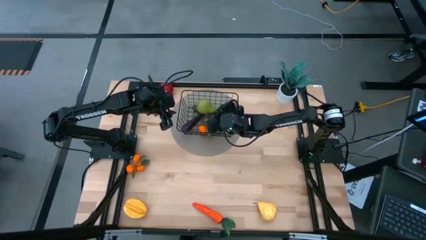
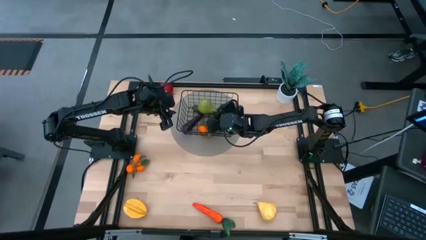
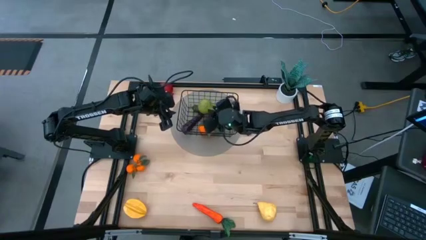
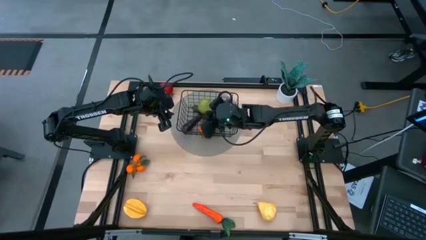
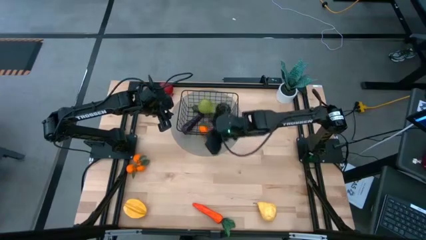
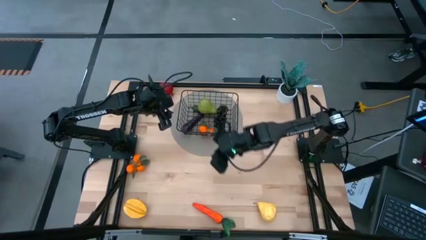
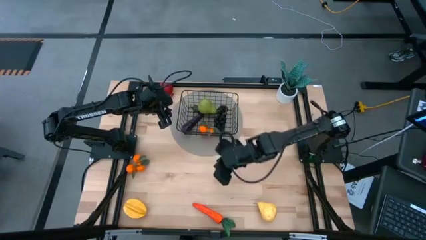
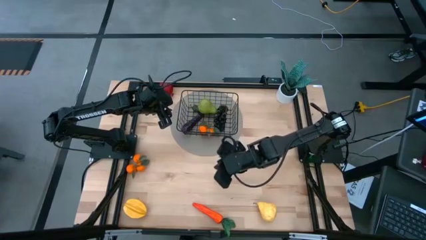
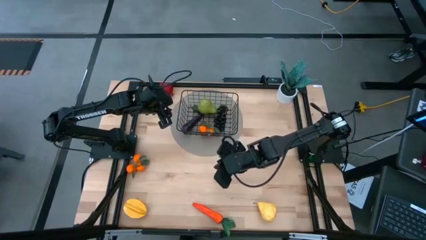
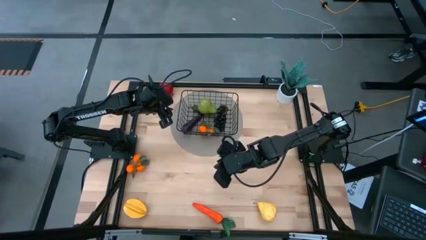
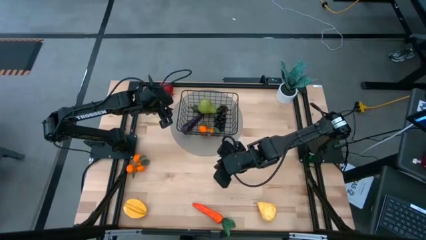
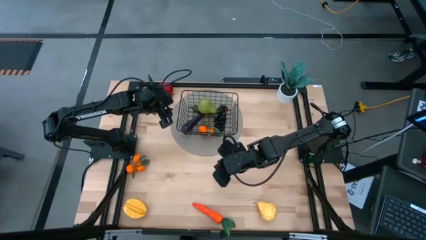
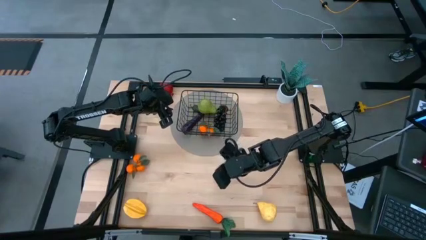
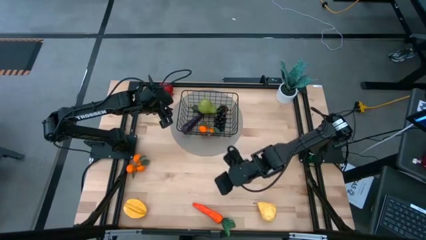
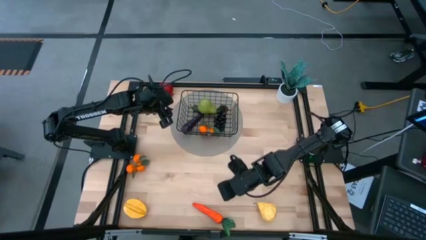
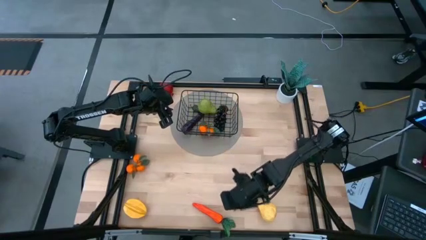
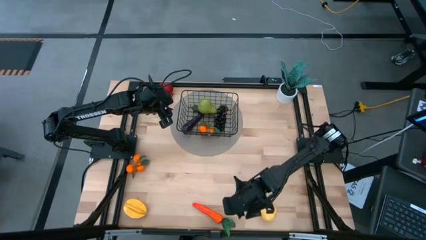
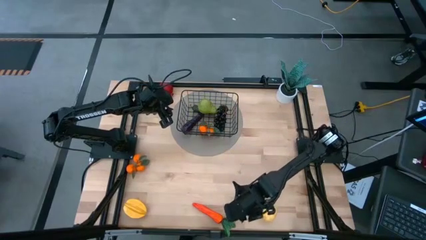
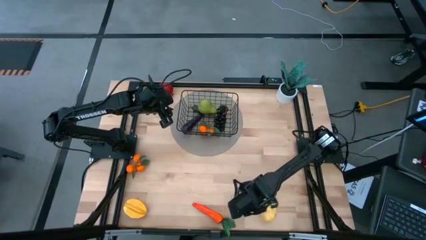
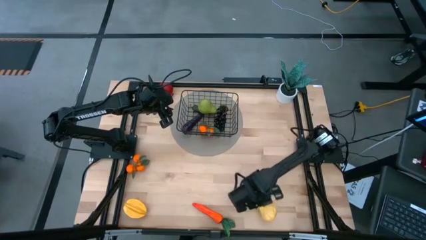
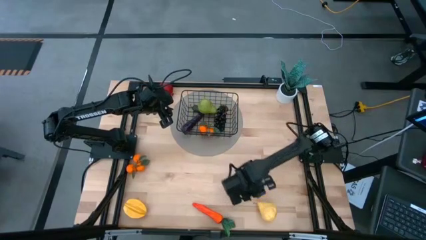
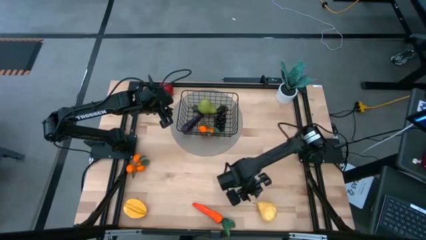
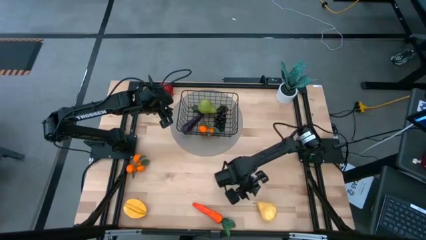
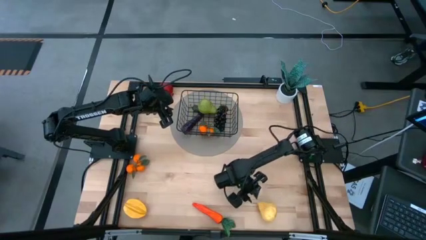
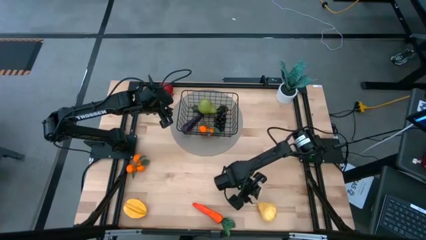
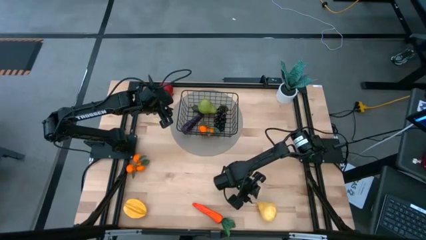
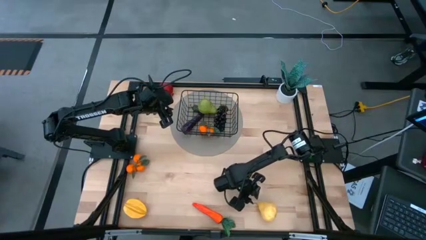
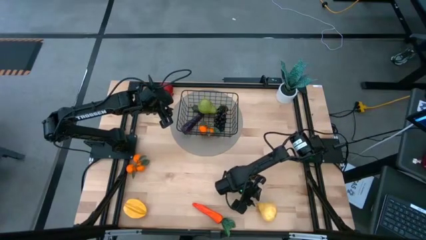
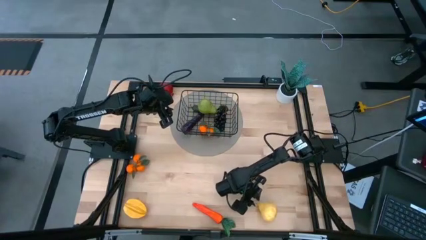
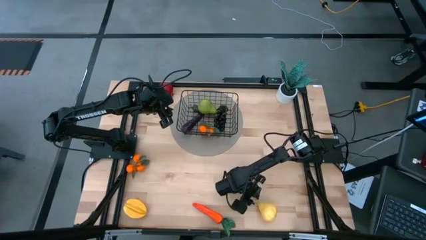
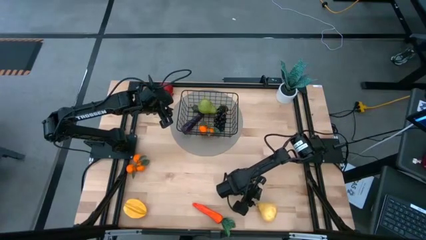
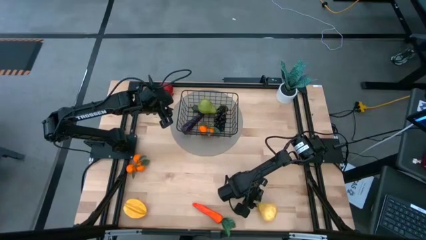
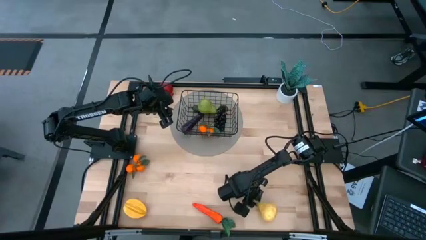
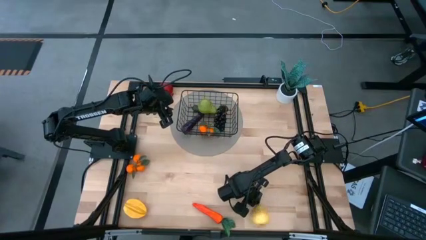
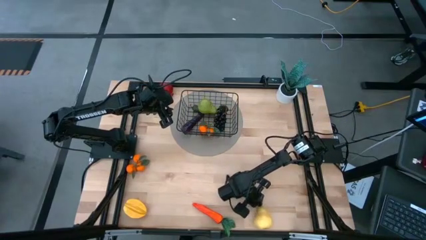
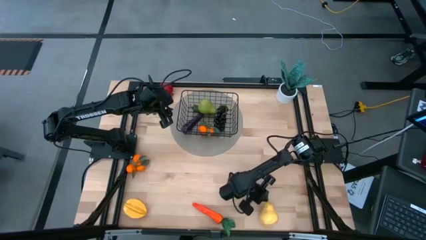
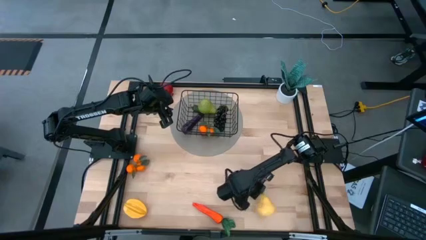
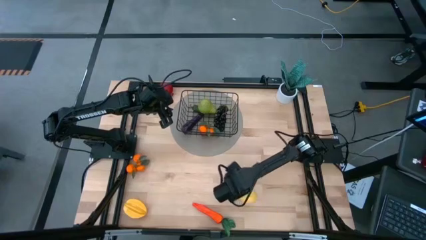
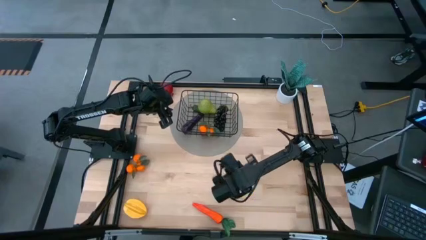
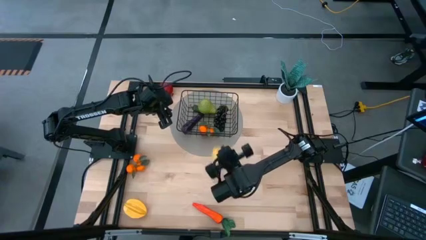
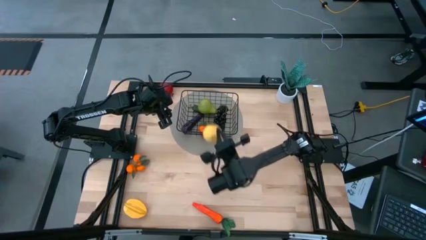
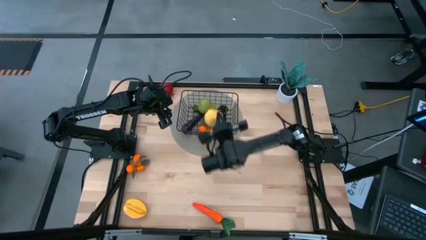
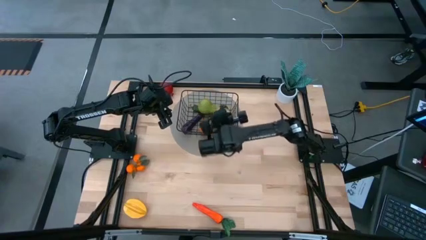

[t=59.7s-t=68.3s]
Task: Build produce basket
Put the yellow pear into the black wire basket

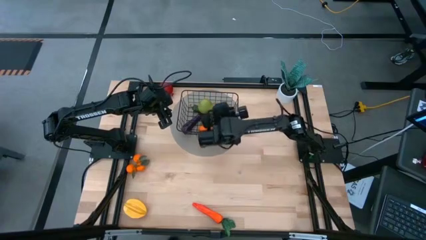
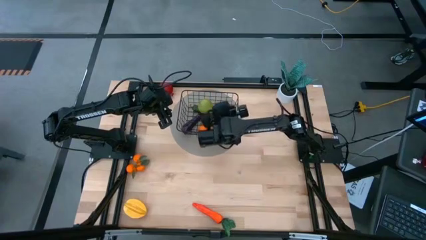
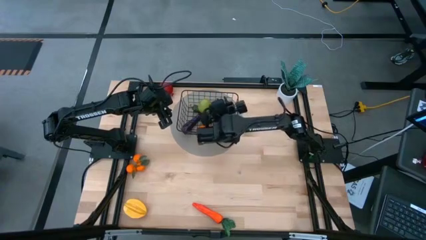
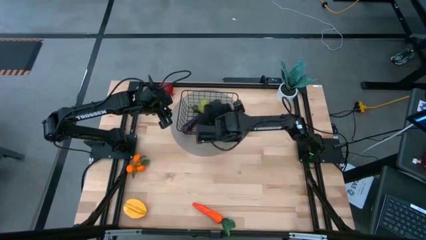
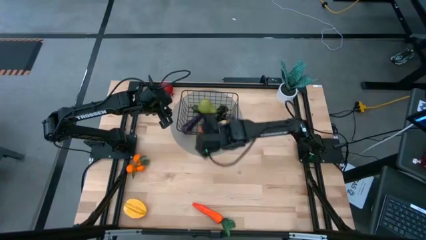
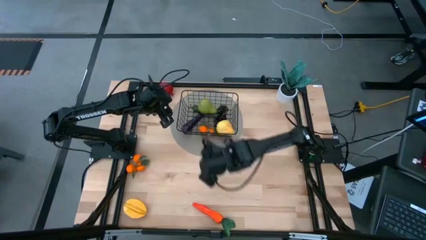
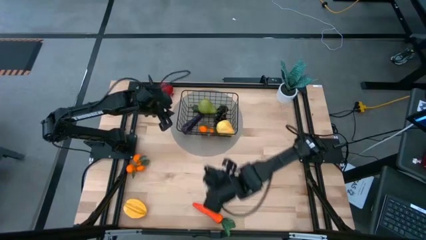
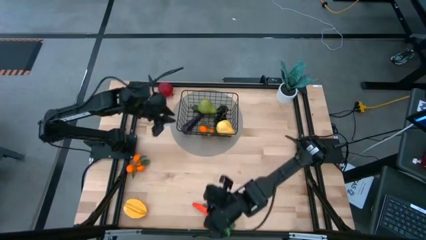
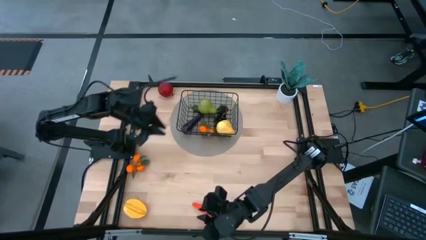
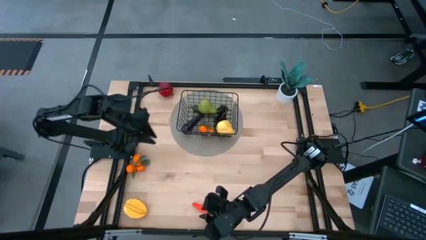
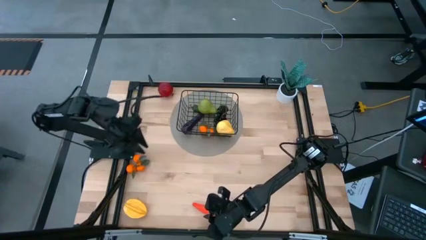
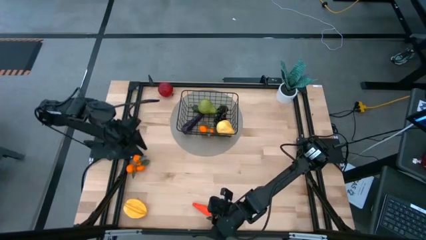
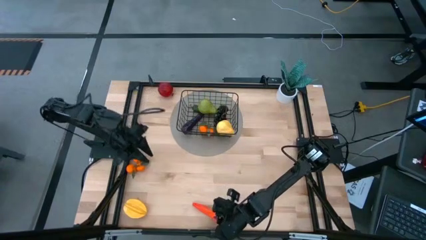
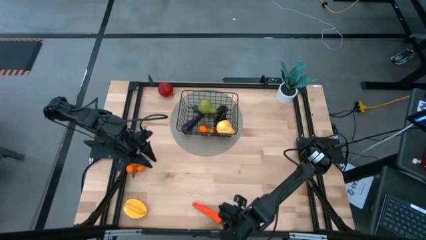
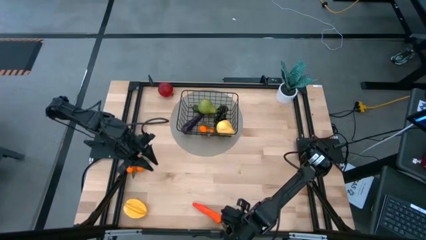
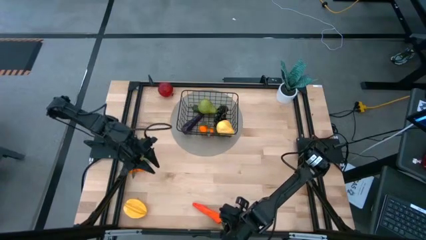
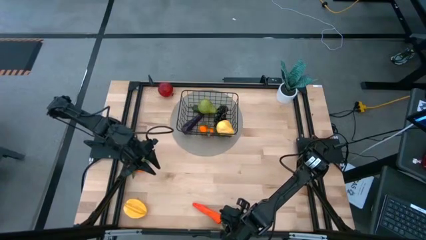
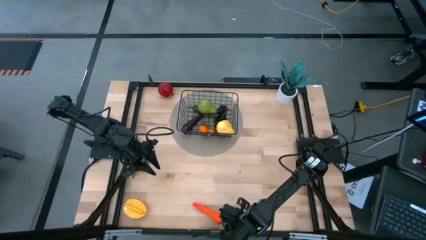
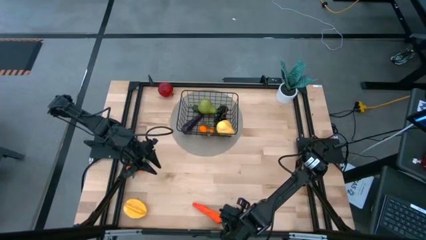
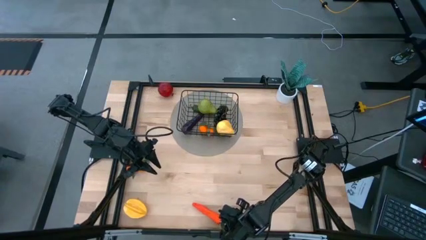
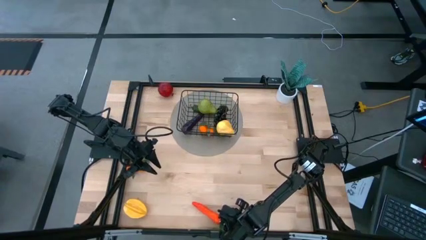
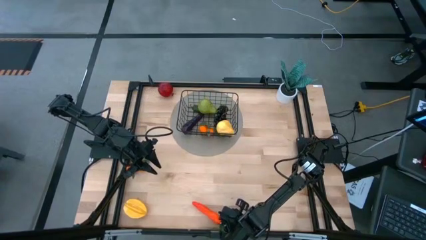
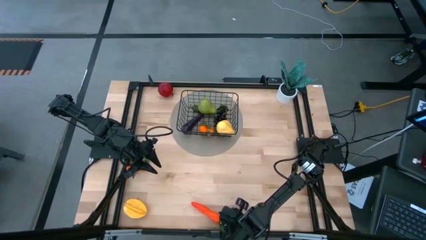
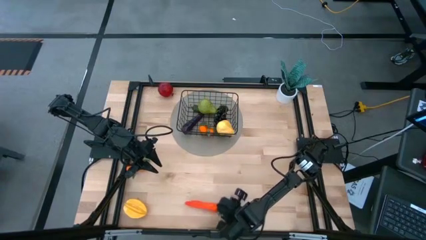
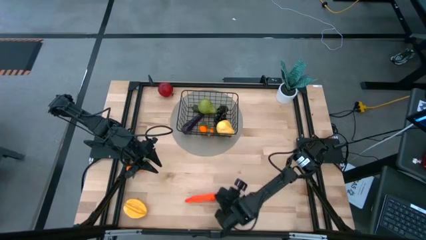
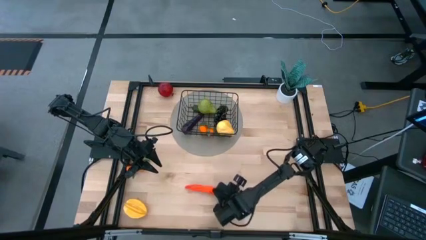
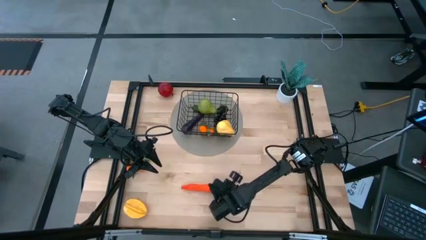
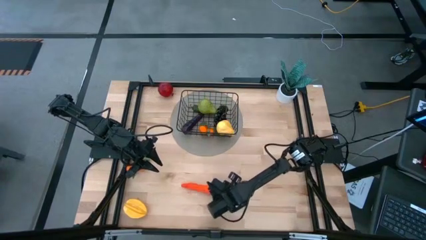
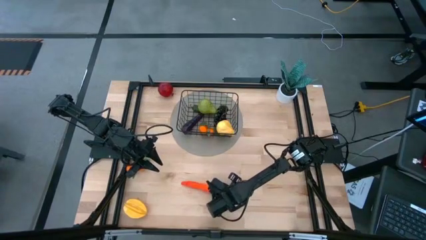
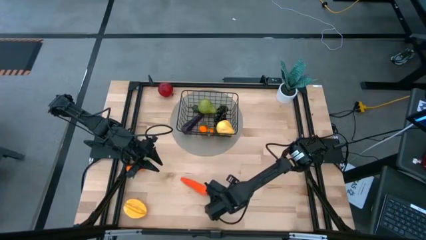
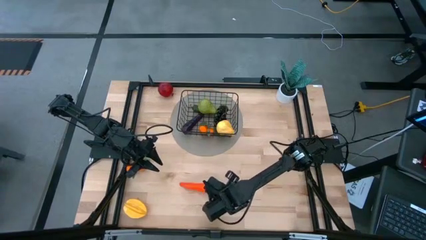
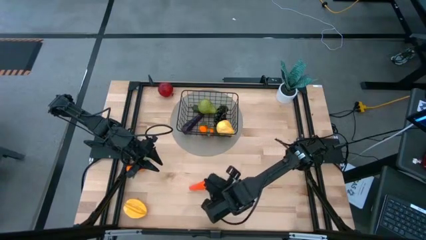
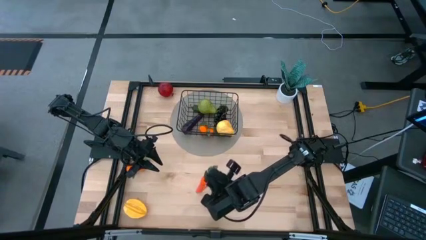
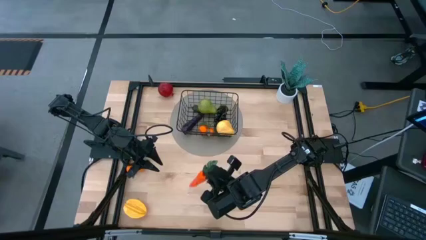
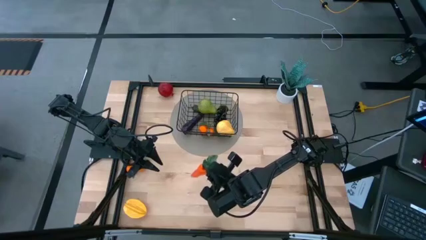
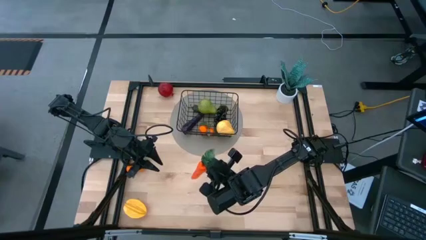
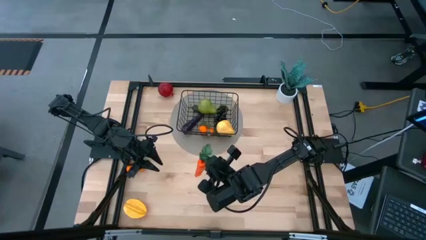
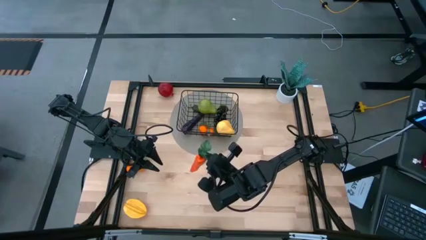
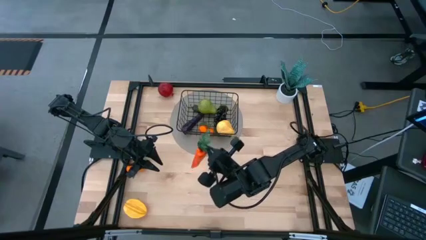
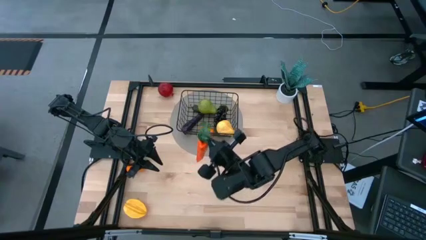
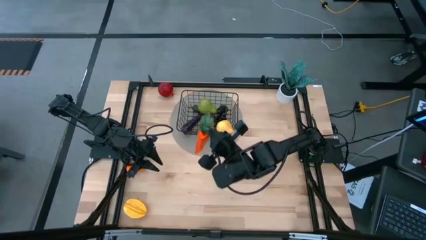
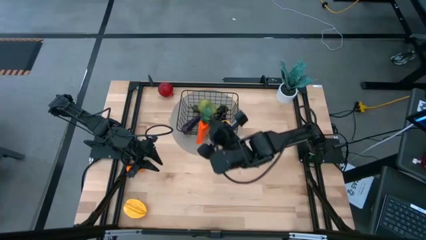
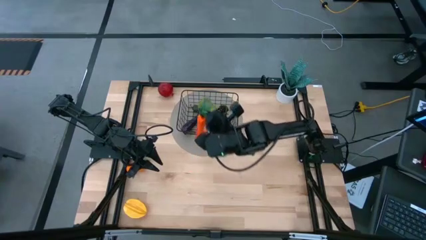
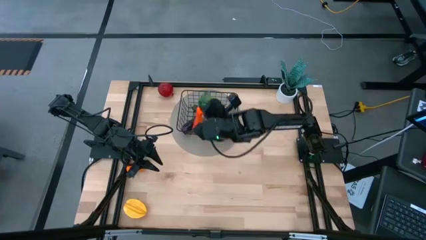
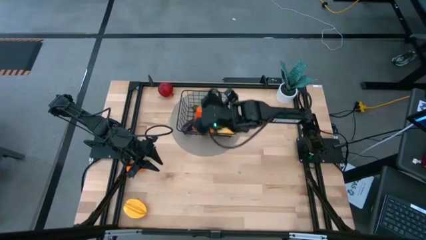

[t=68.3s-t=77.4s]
Put the orange carrot into the black wire basket
